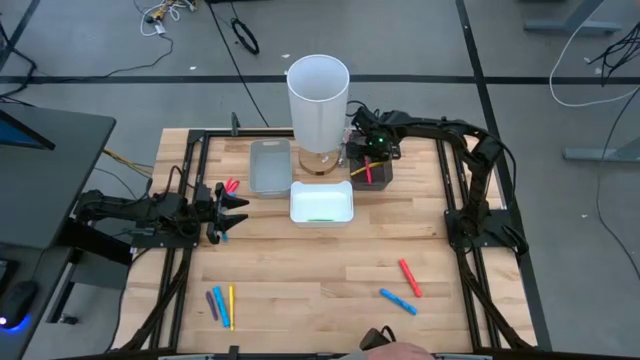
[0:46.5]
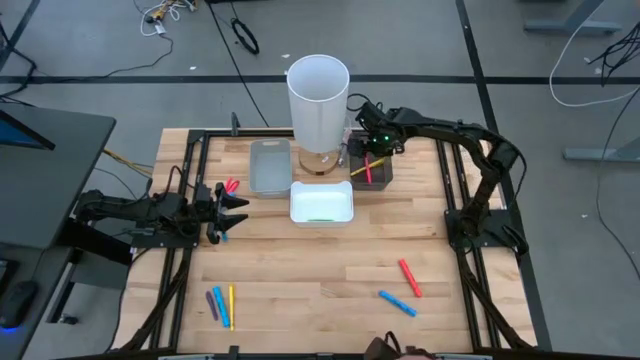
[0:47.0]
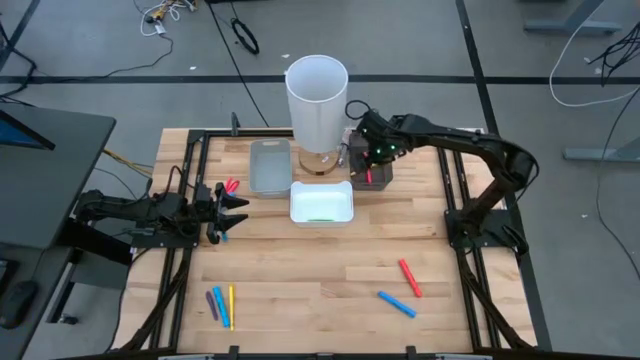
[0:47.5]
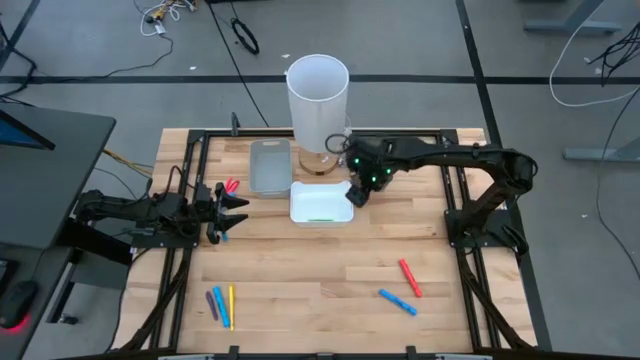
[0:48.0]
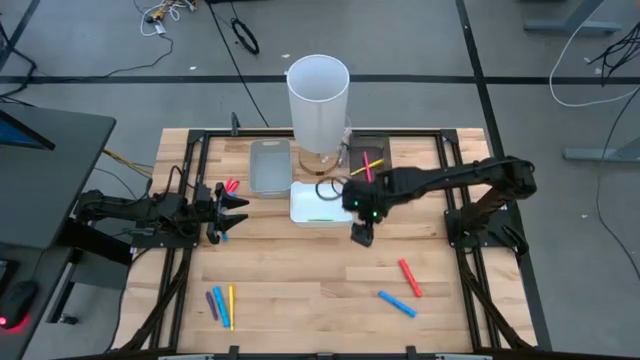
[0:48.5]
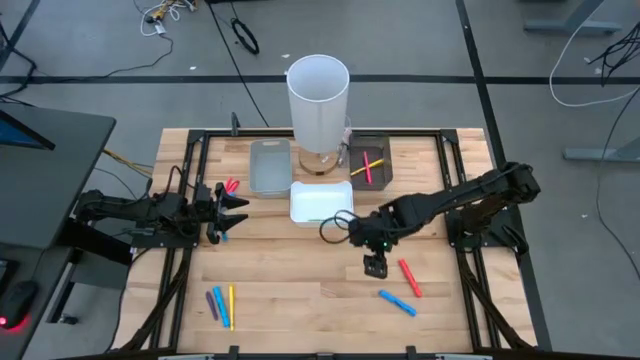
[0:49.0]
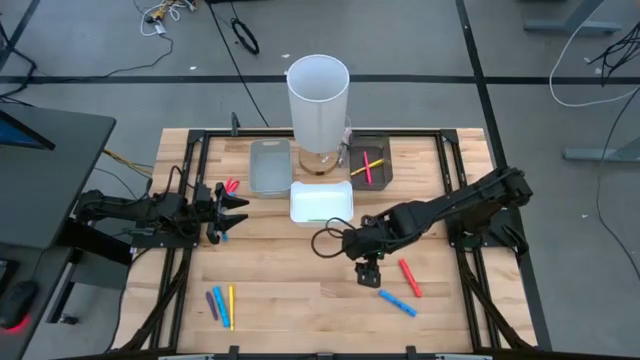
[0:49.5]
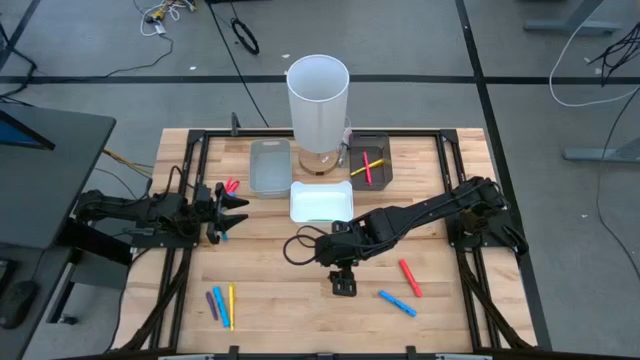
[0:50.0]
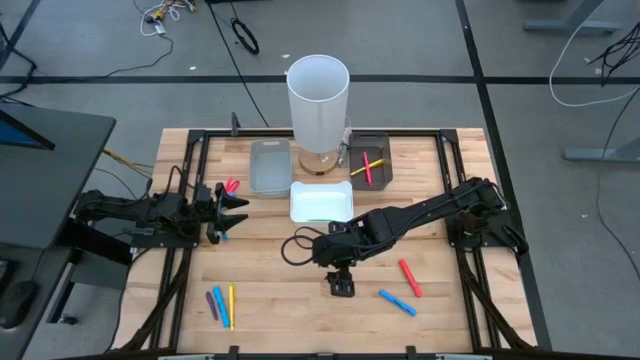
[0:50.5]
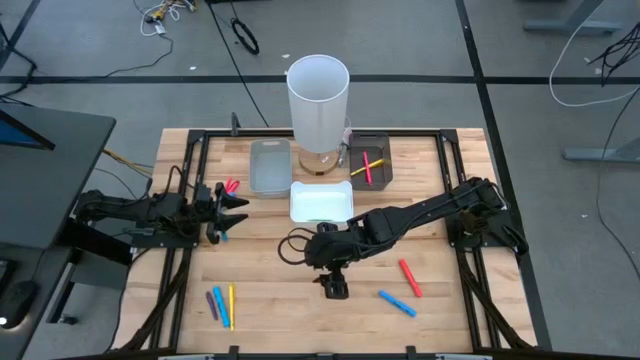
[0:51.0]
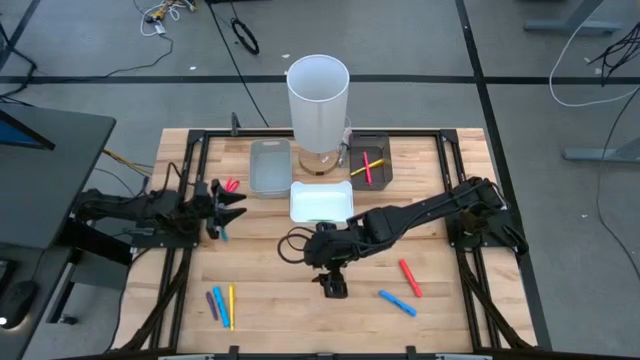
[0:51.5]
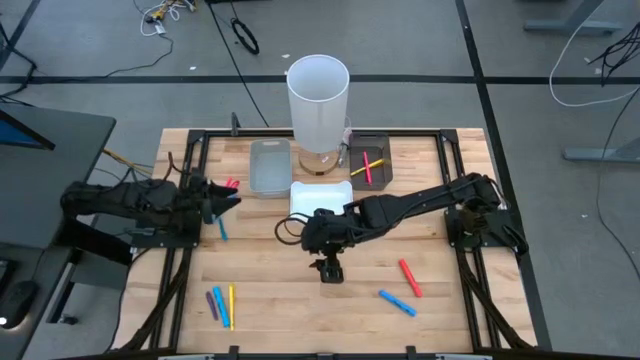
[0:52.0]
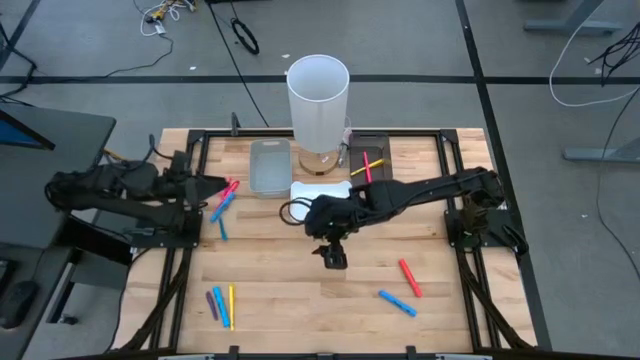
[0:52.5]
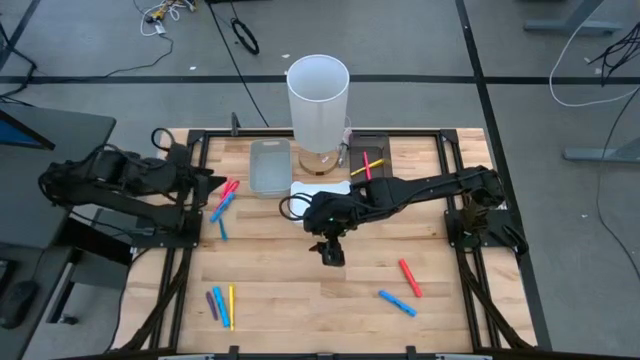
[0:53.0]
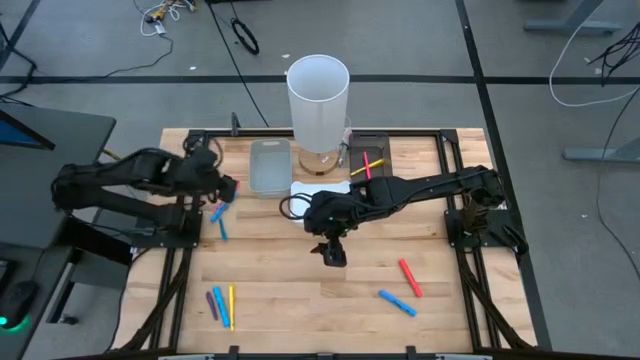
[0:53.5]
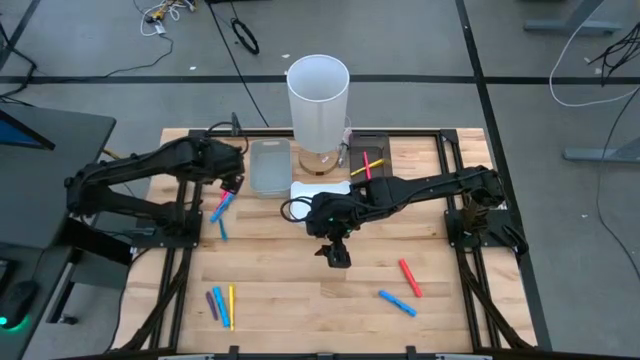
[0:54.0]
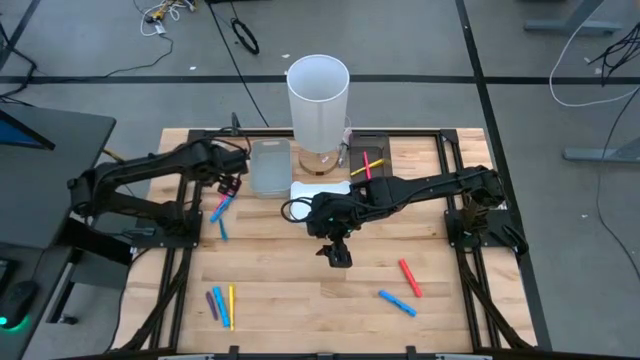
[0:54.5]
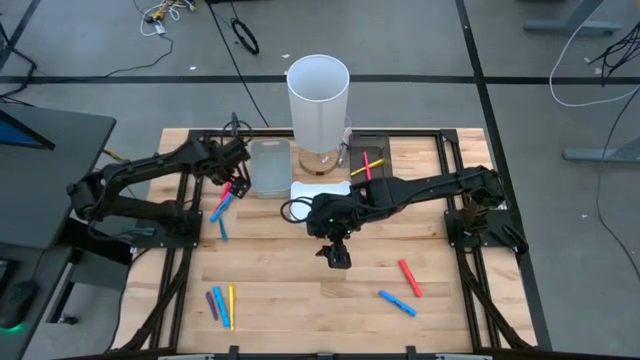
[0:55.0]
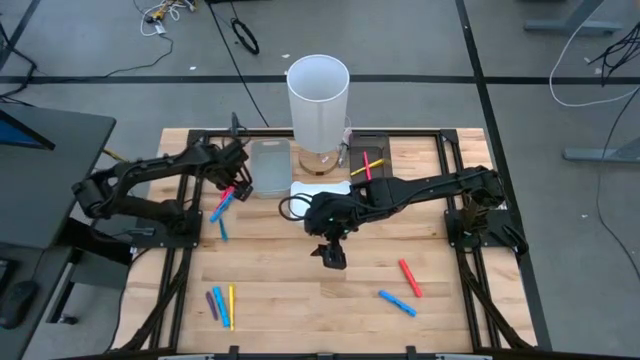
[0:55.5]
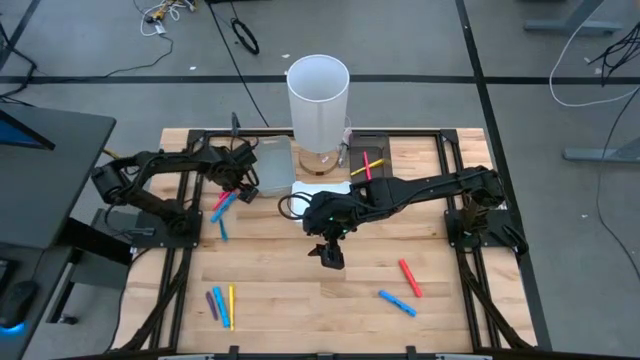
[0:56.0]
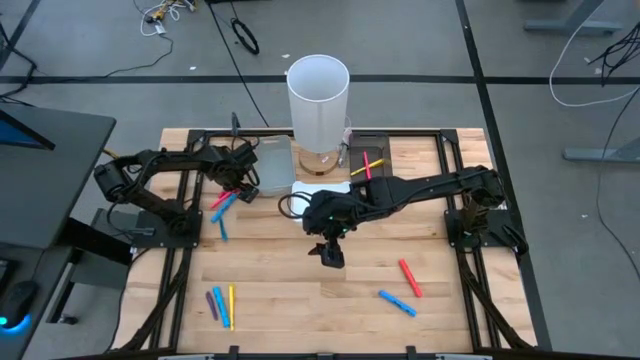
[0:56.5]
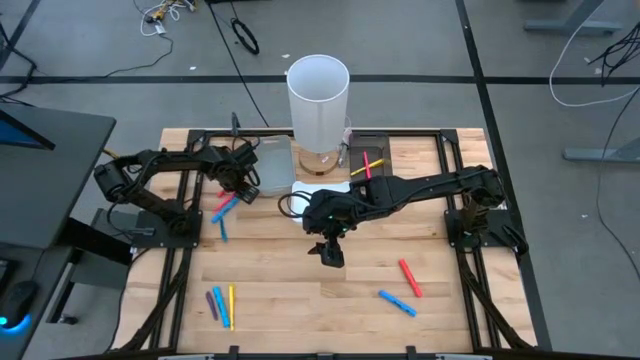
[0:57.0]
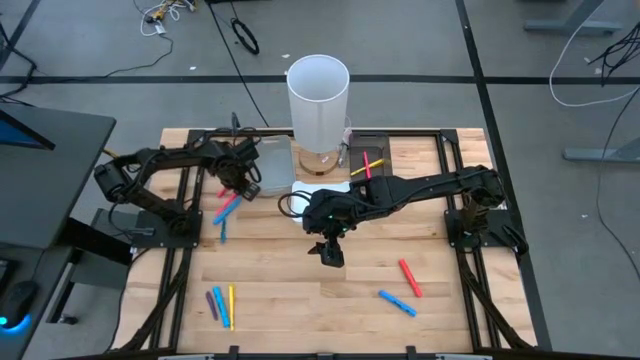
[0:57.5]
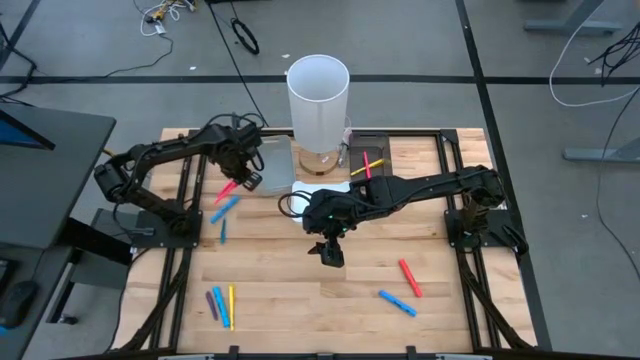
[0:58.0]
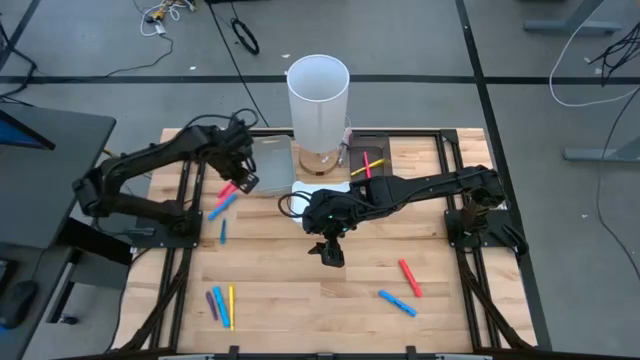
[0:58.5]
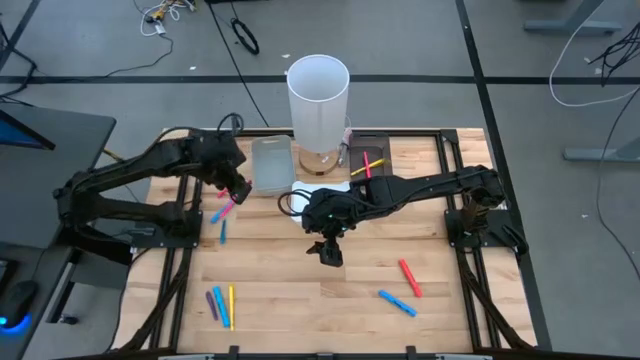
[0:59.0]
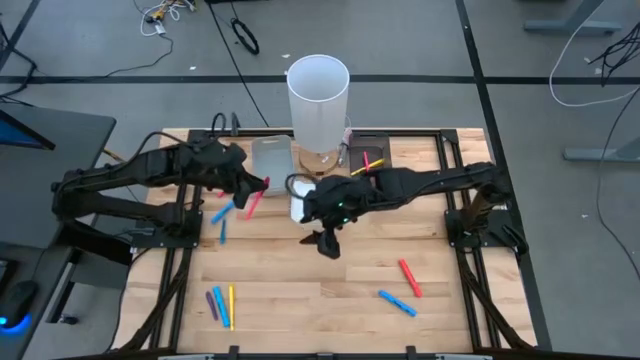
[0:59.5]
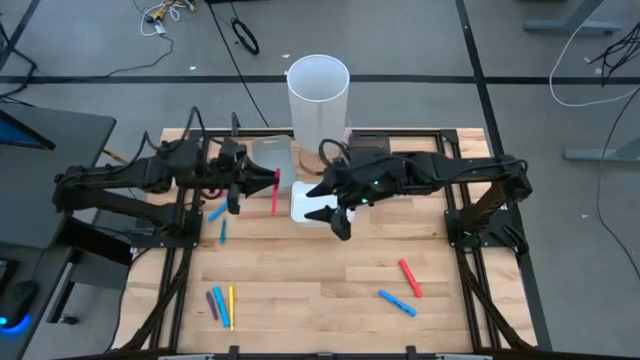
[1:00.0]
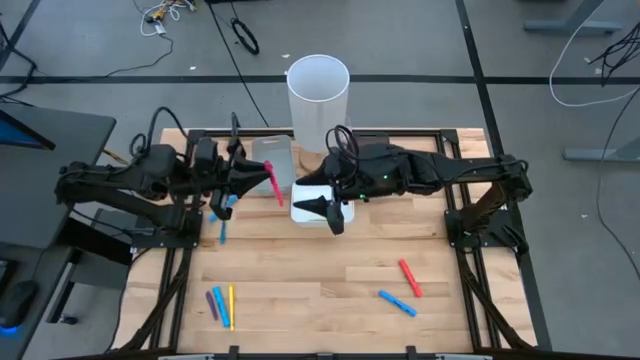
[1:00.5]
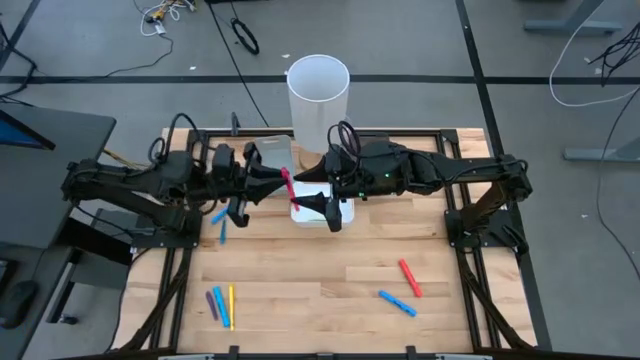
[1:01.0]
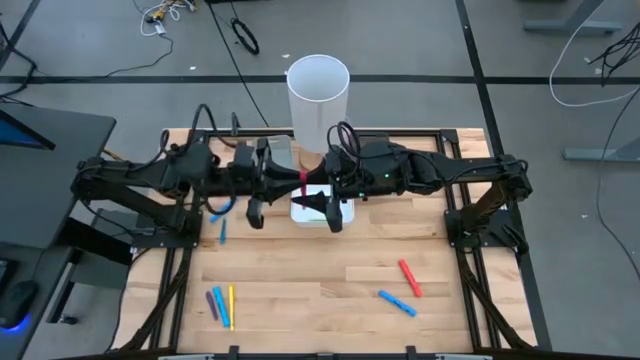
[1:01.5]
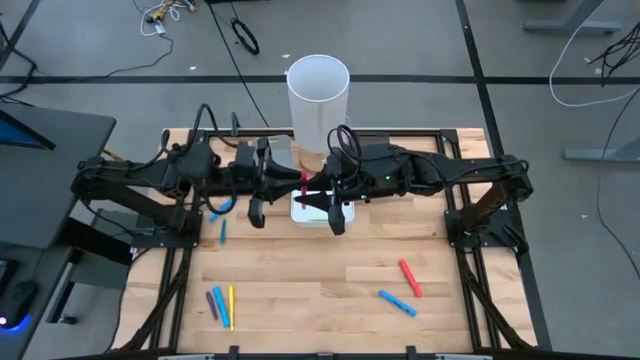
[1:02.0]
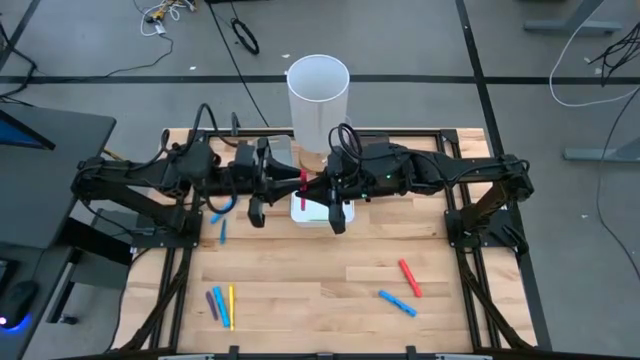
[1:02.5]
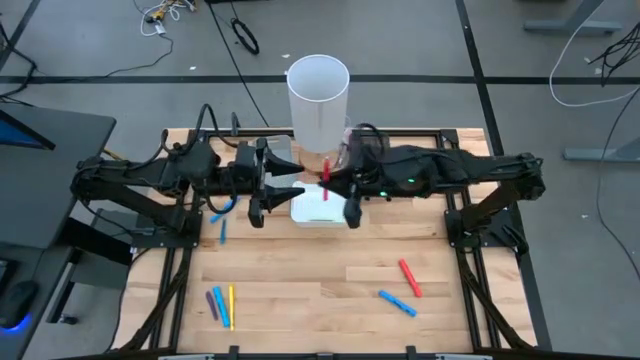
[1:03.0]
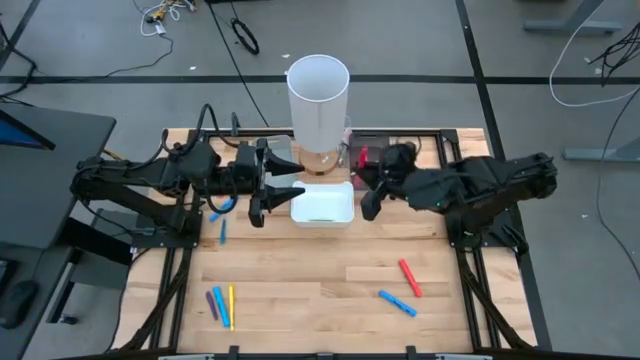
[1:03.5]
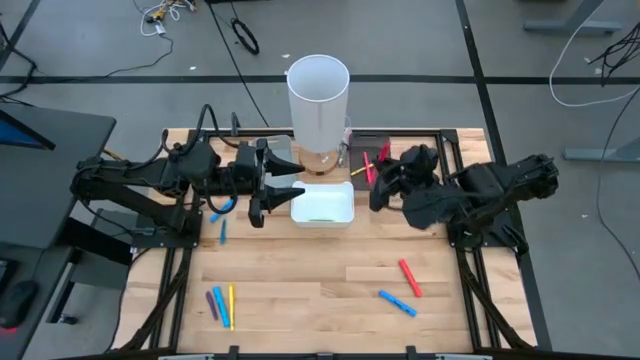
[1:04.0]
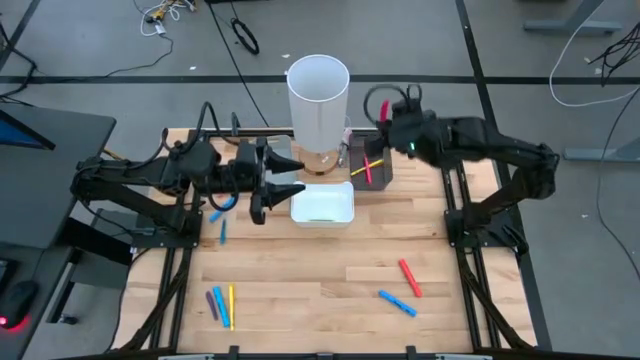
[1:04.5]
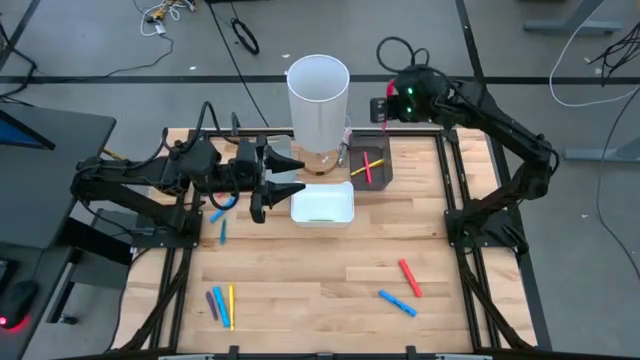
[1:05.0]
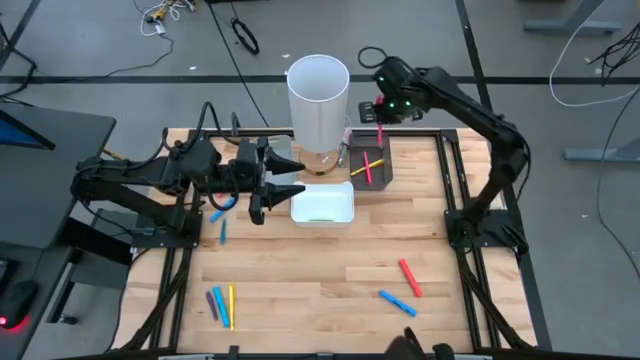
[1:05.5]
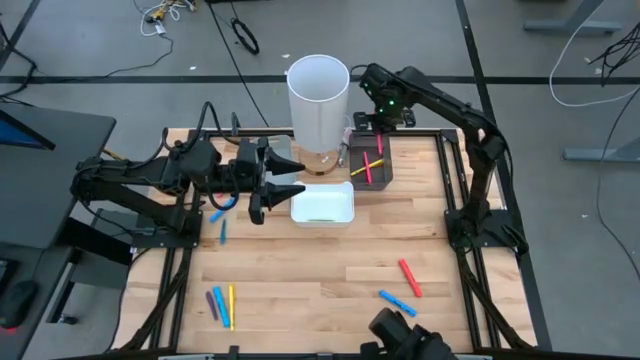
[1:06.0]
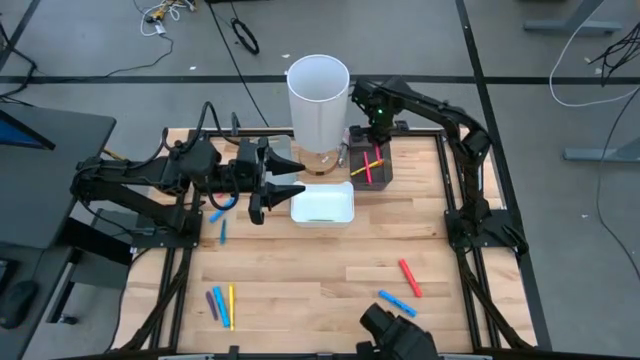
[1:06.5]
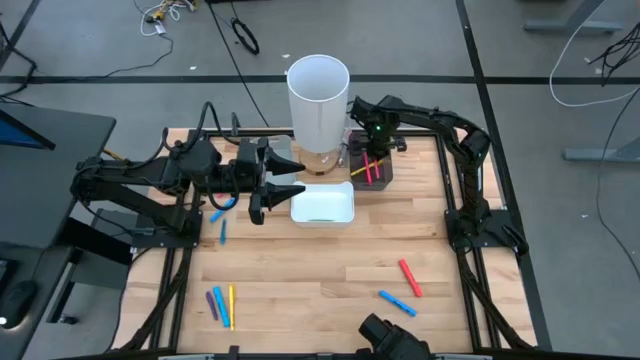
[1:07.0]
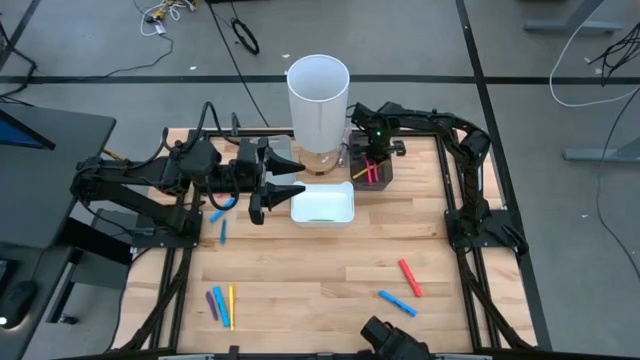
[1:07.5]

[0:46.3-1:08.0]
Task: Pick & Place Markers
Put the pink marker pen into the black bin
